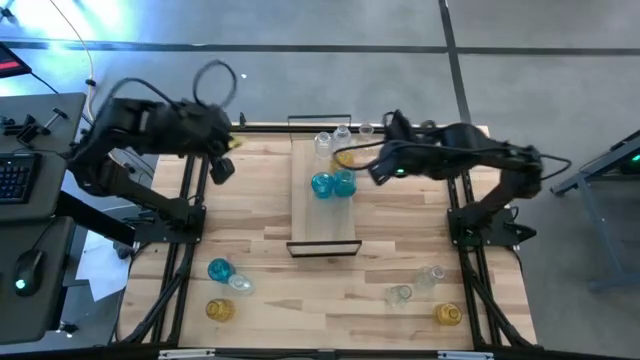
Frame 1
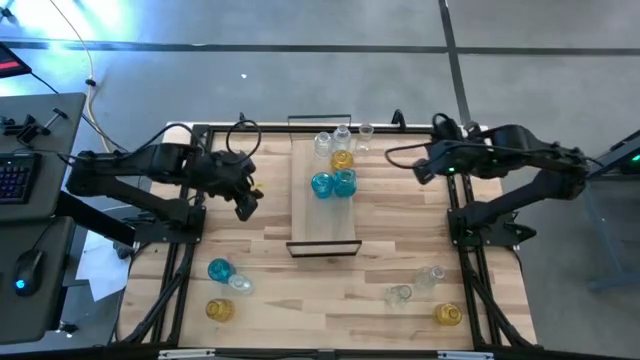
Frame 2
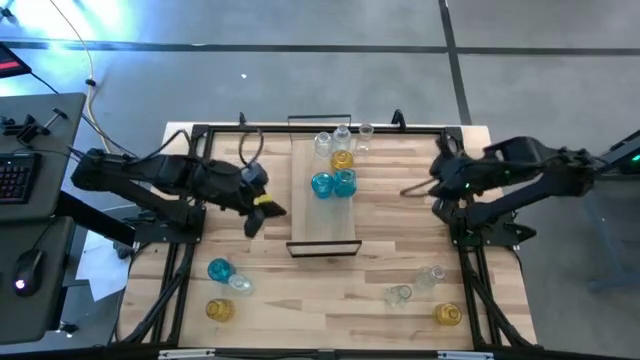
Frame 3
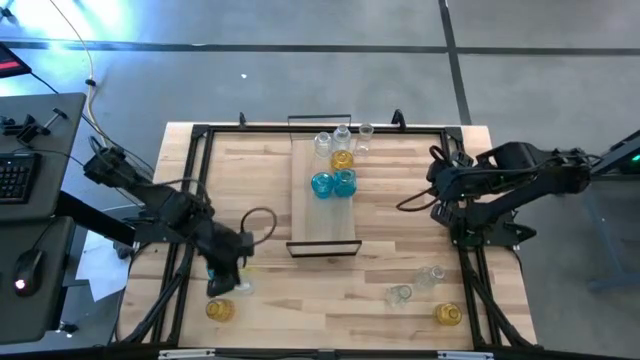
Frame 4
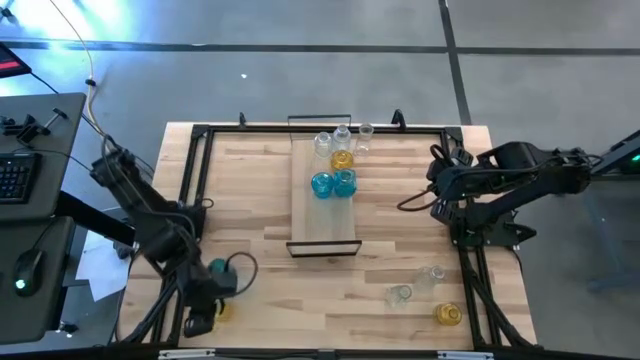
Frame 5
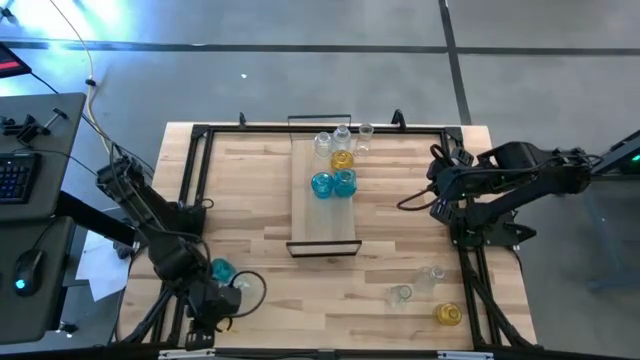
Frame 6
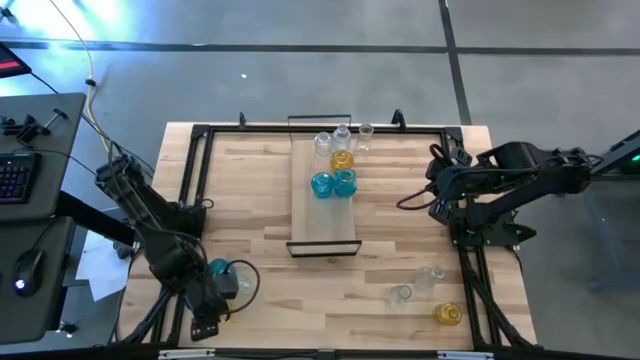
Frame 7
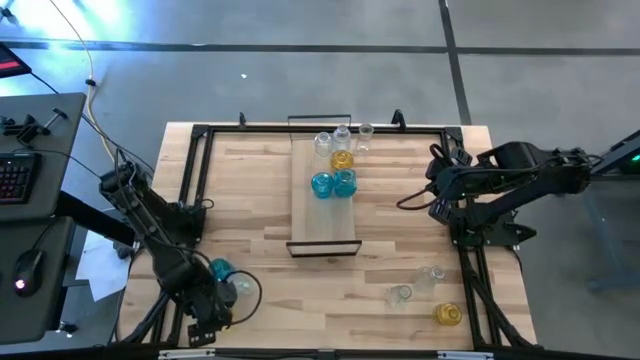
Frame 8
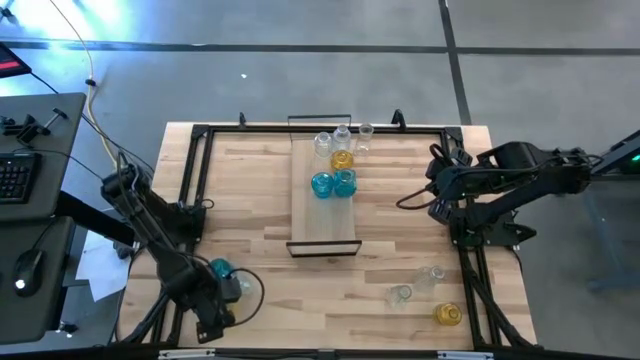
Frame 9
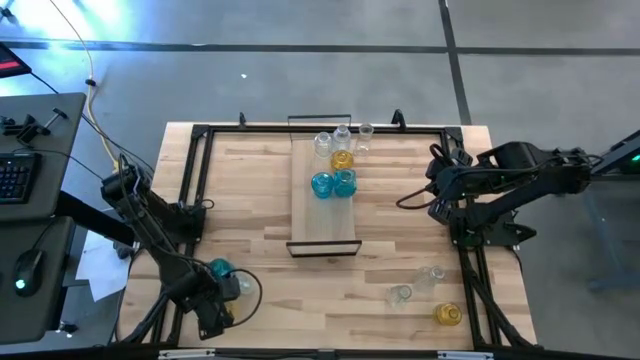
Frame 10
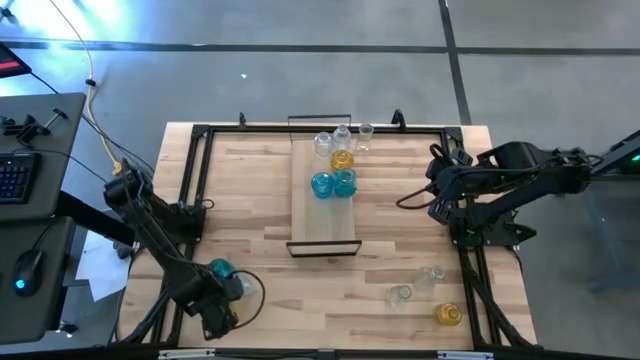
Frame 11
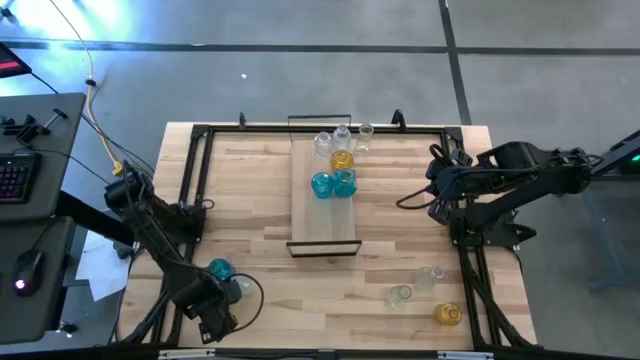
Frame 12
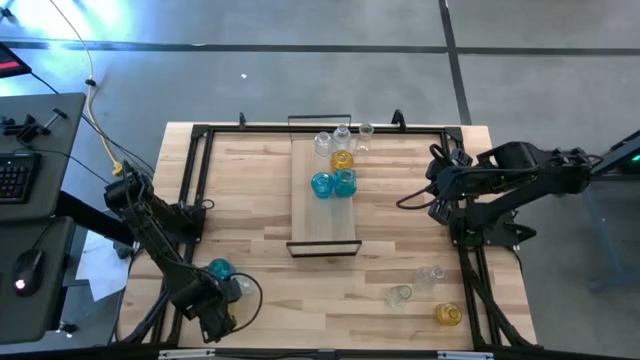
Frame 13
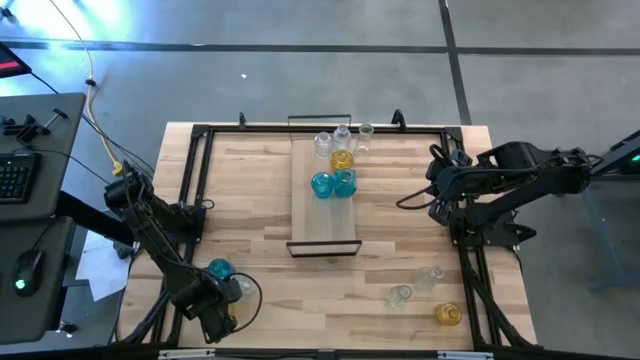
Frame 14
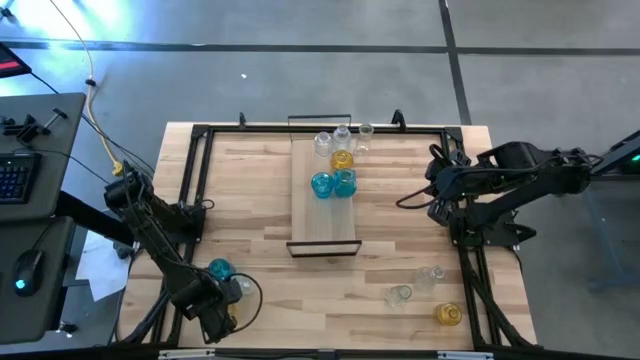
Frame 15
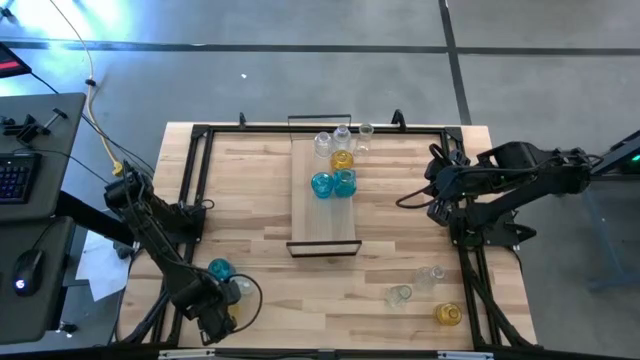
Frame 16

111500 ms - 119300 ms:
Task: sort vases onto shelf
Put the bottom left yellow flower vase on the shelf aligned with the other yellow flower vase

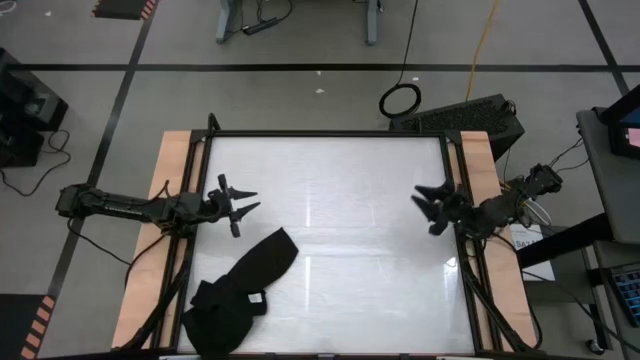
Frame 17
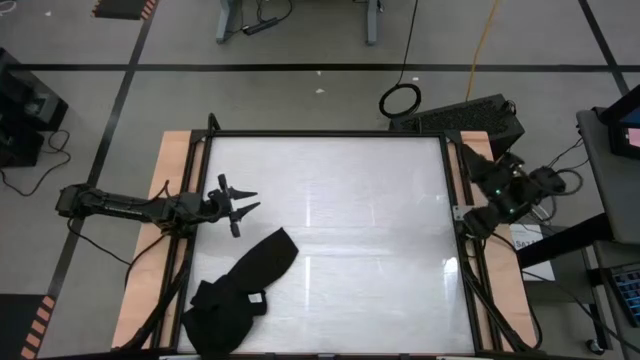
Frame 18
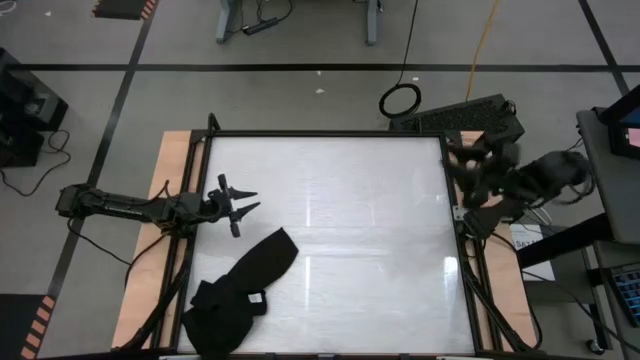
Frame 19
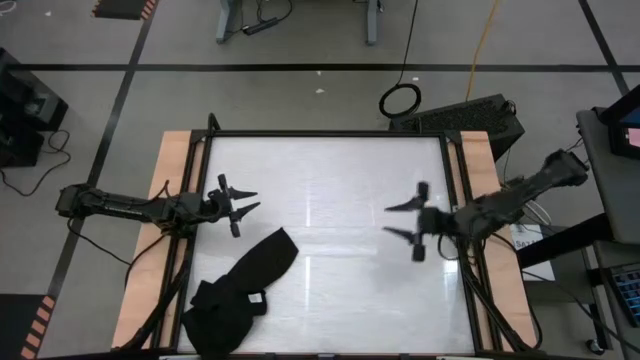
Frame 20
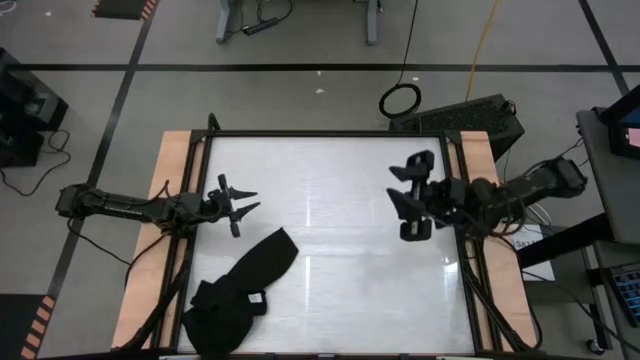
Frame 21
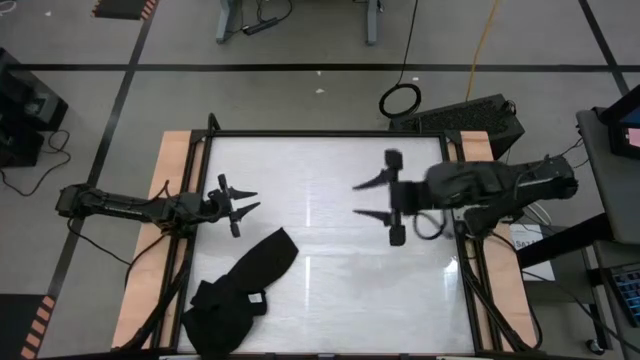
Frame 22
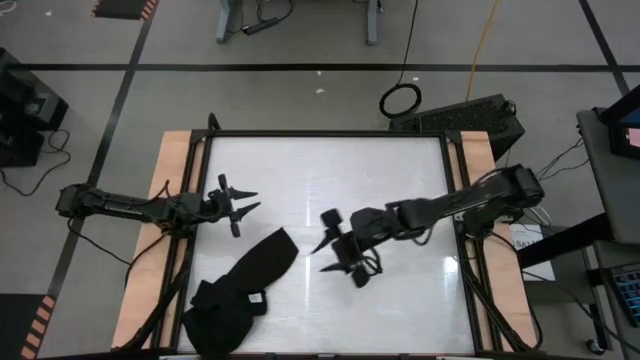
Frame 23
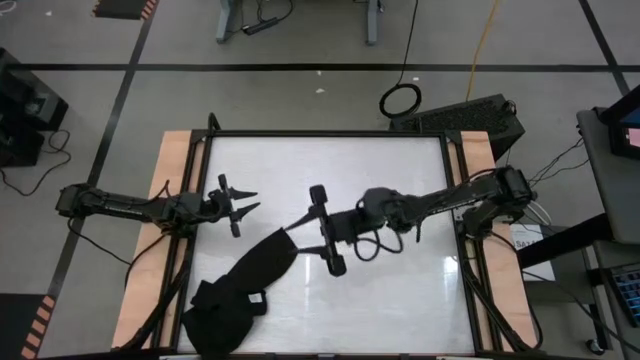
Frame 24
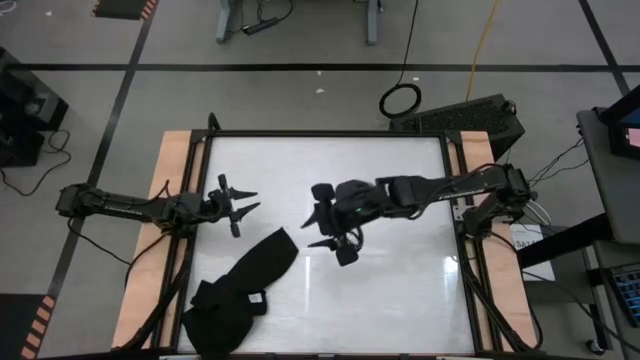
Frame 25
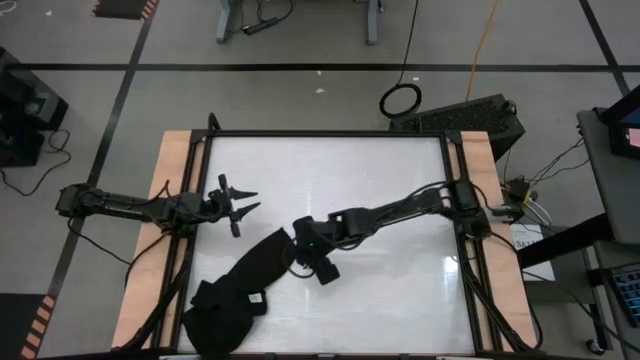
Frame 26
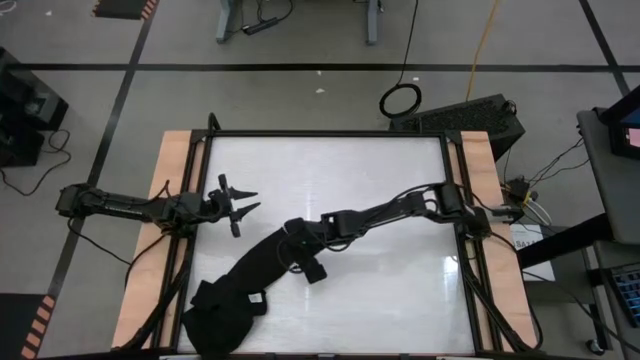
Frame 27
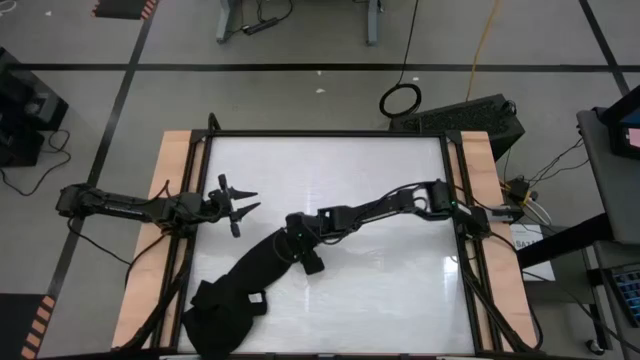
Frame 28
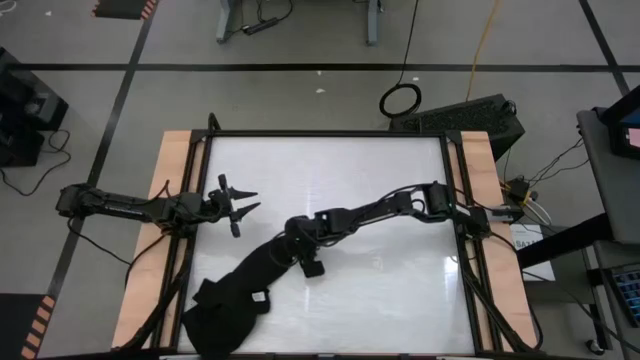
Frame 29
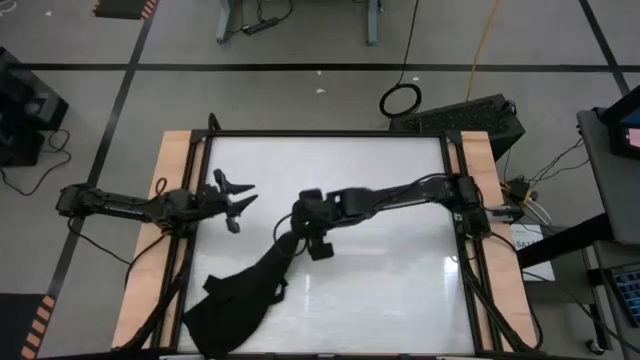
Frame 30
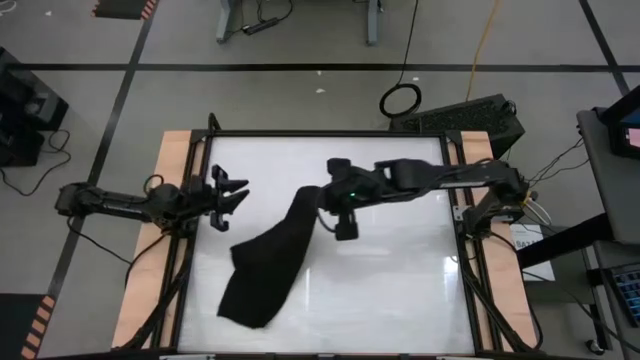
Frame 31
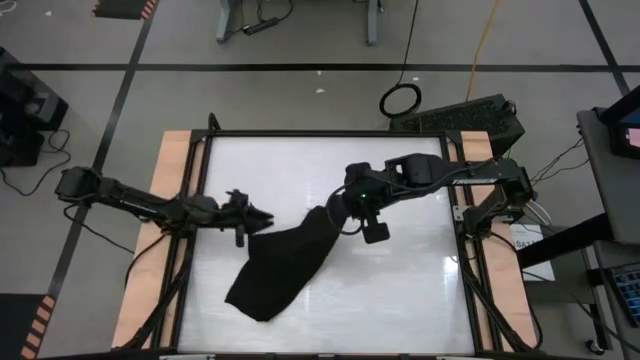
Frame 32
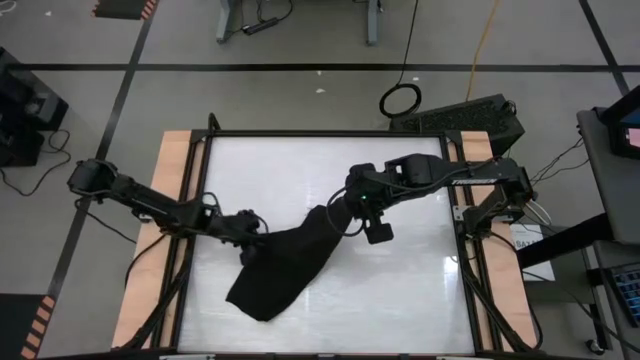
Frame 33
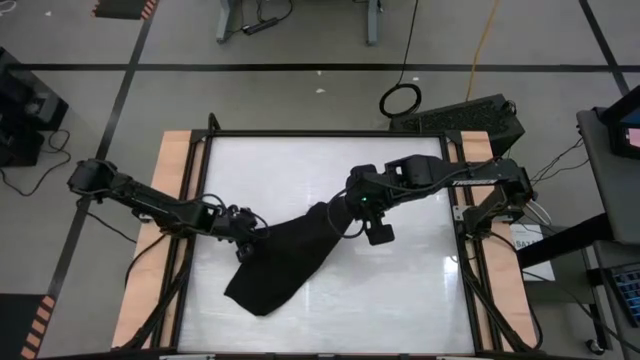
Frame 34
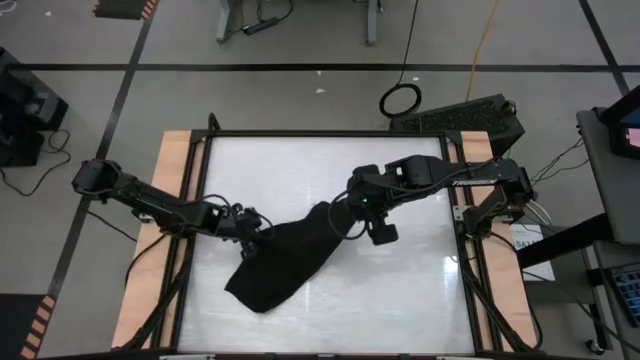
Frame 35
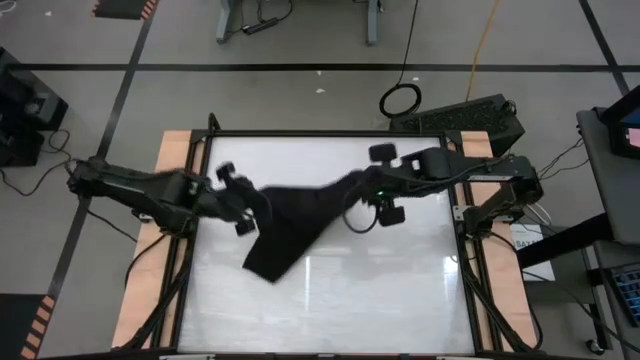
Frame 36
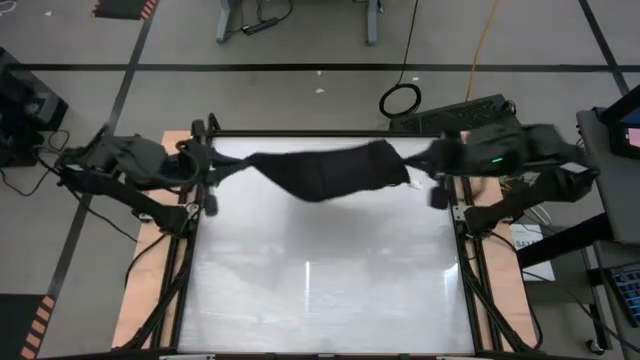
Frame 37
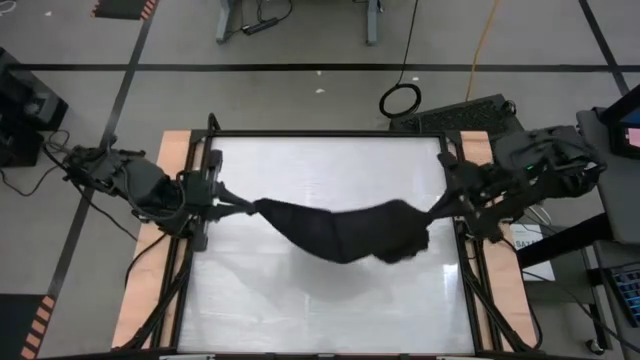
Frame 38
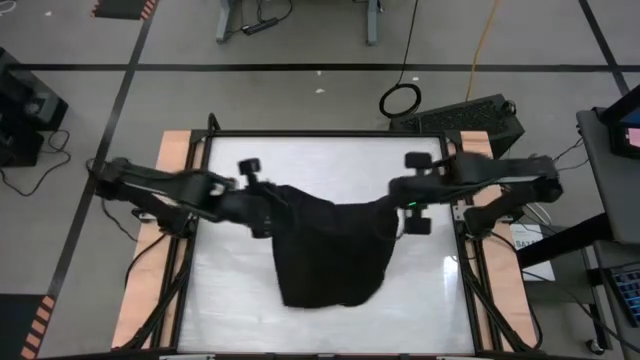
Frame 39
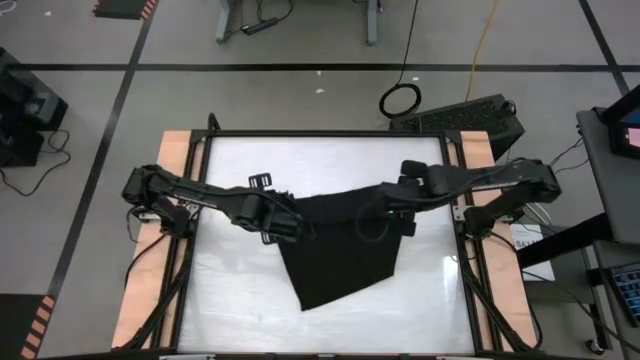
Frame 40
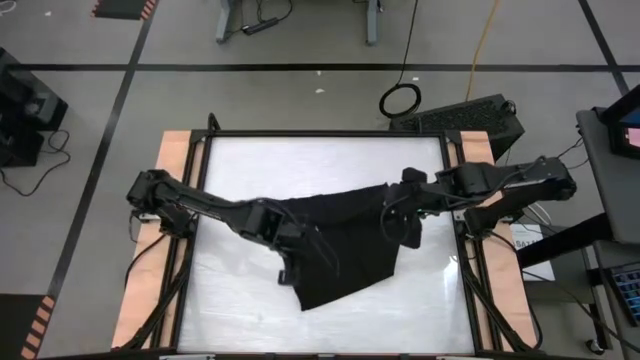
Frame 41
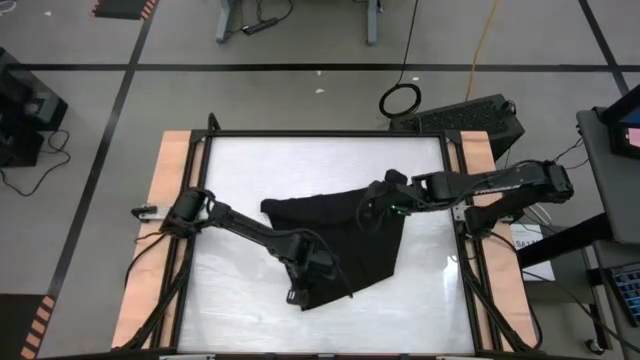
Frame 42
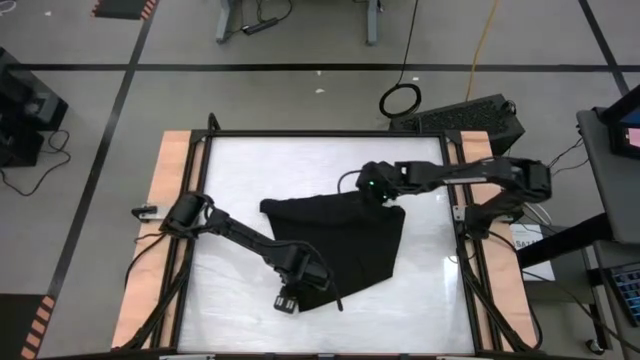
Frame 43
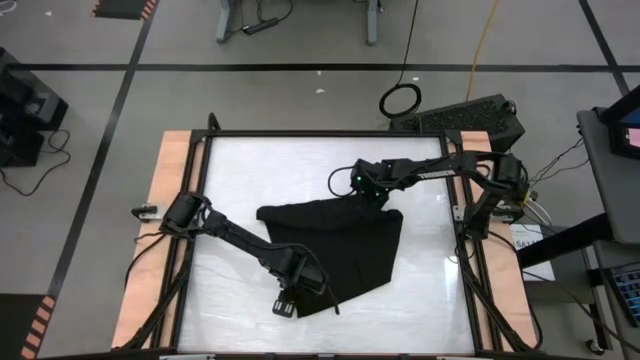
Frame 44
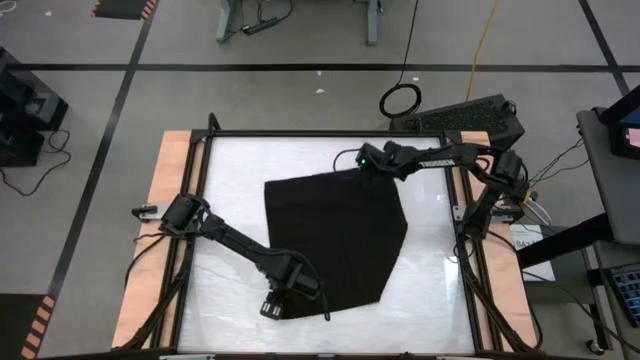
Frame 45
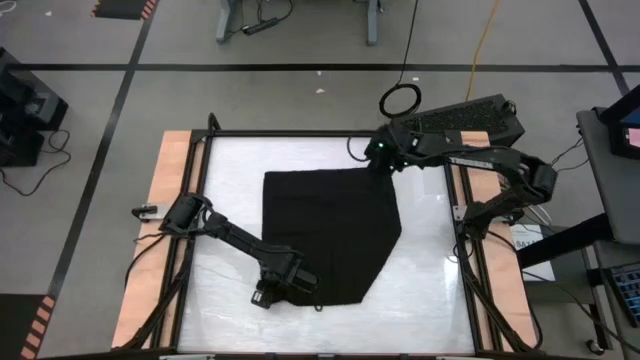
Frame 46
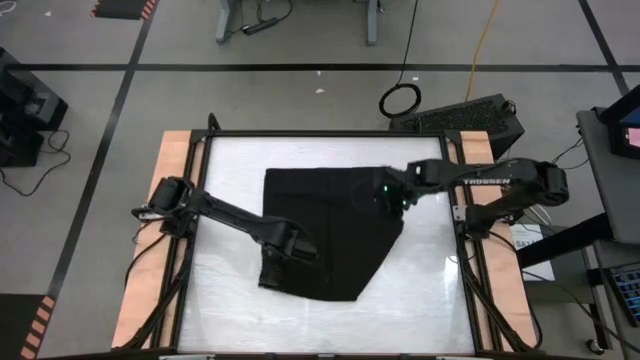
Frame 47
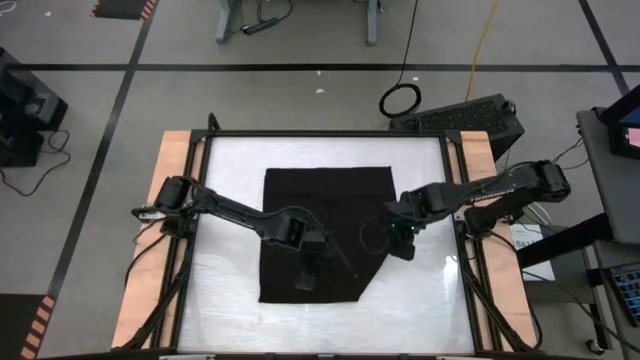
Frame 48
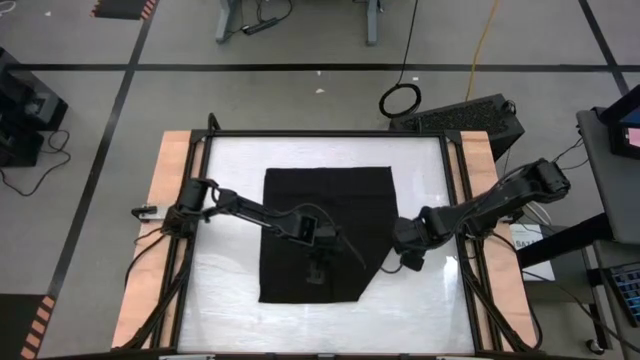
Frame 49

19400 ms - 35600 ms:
Task: Roll towel into tight, uniform cylinder
Fold the black towel
